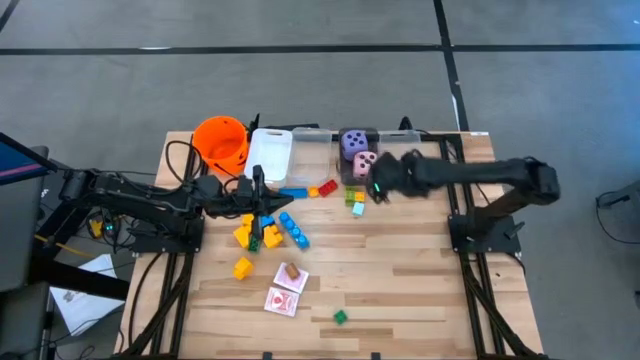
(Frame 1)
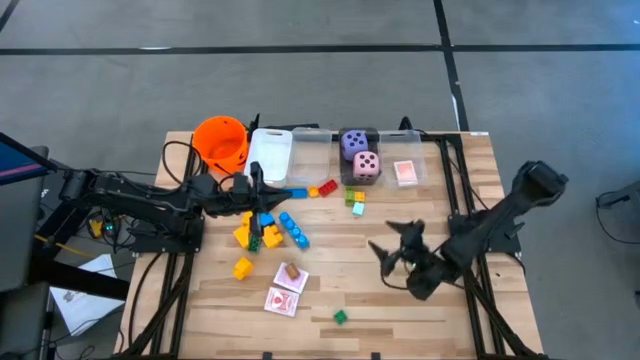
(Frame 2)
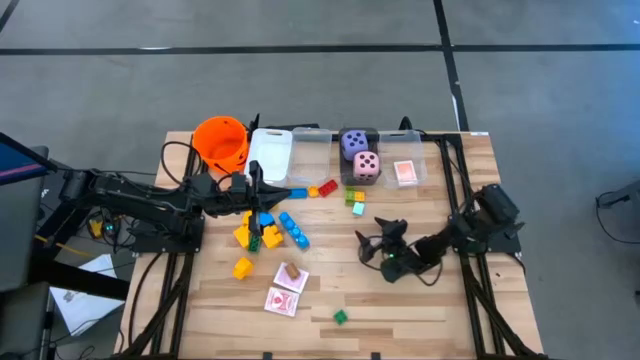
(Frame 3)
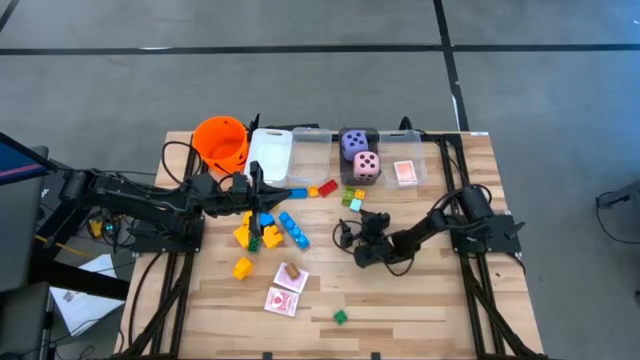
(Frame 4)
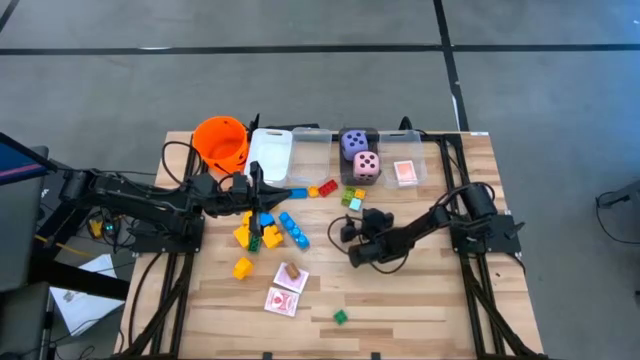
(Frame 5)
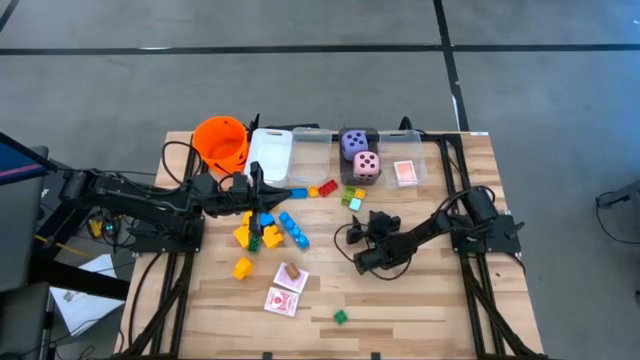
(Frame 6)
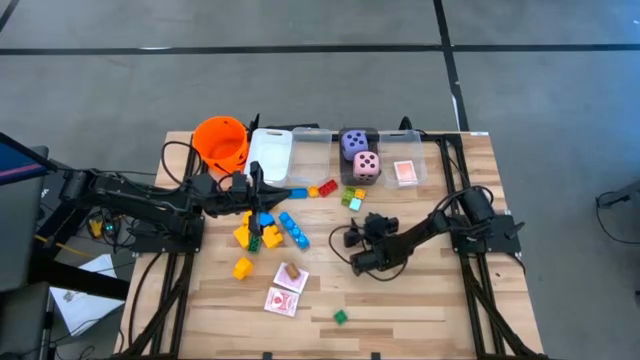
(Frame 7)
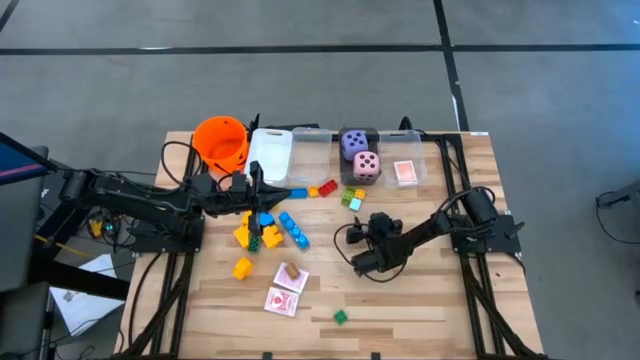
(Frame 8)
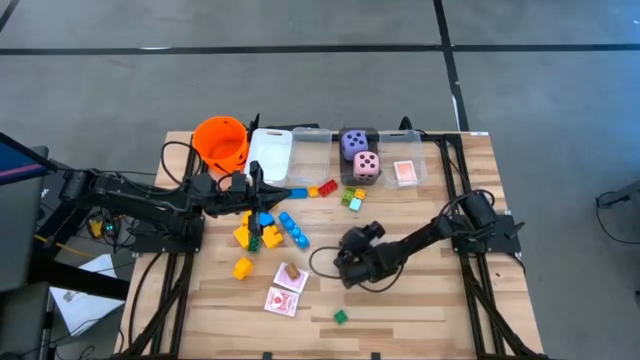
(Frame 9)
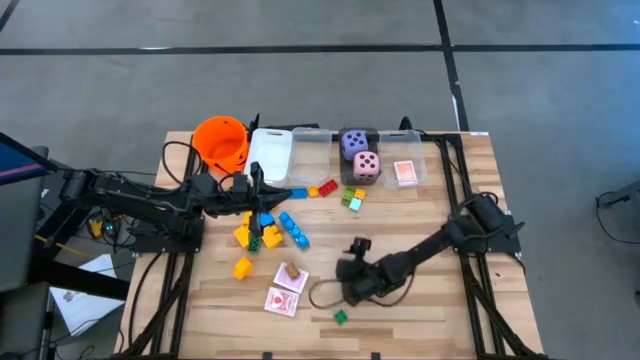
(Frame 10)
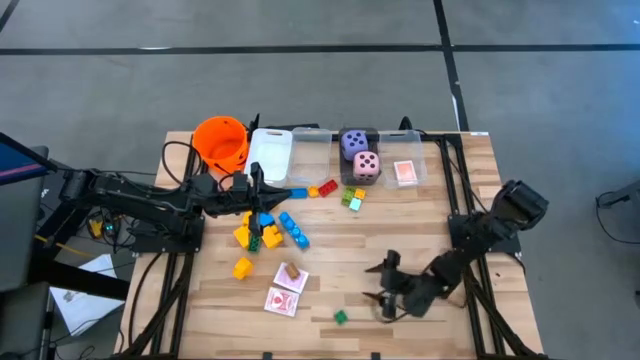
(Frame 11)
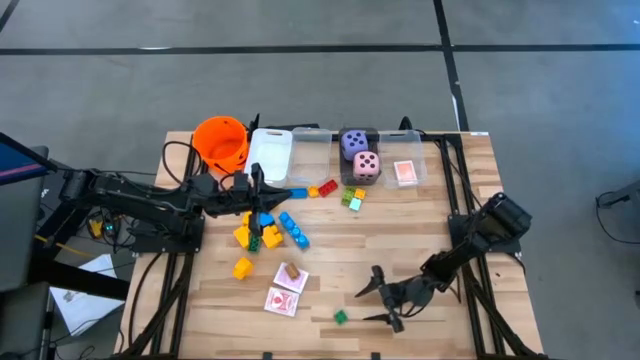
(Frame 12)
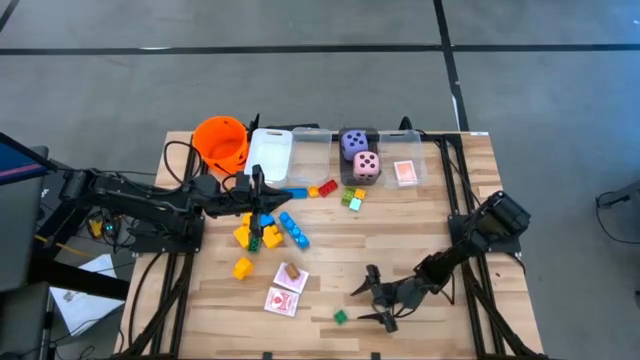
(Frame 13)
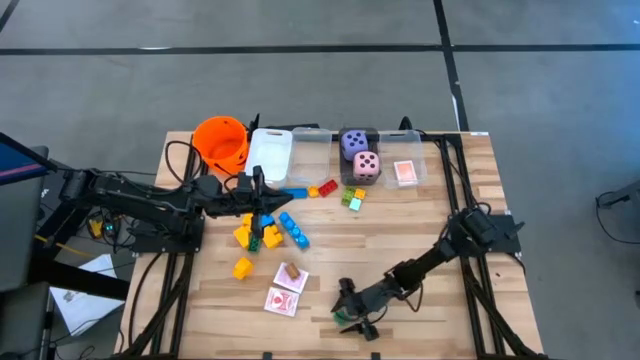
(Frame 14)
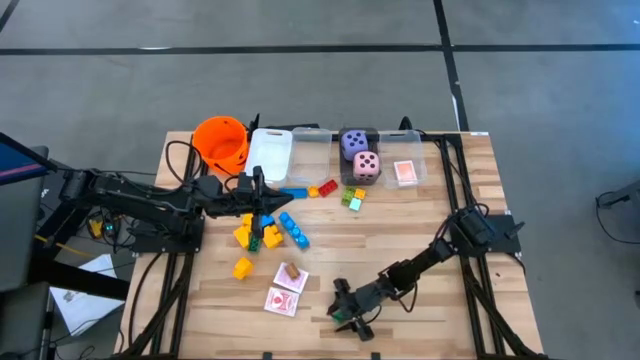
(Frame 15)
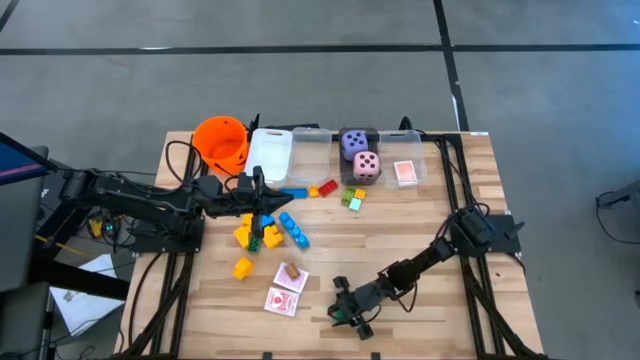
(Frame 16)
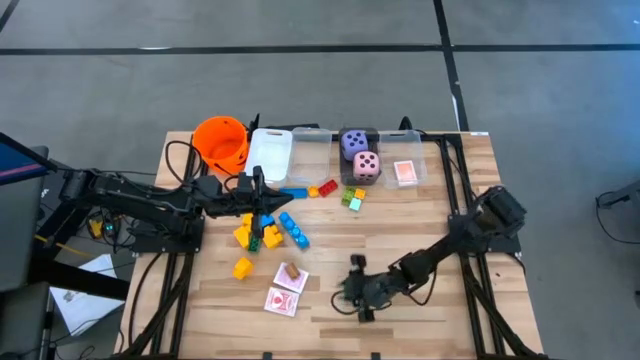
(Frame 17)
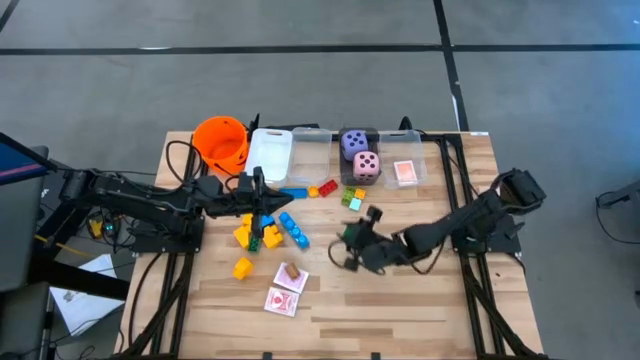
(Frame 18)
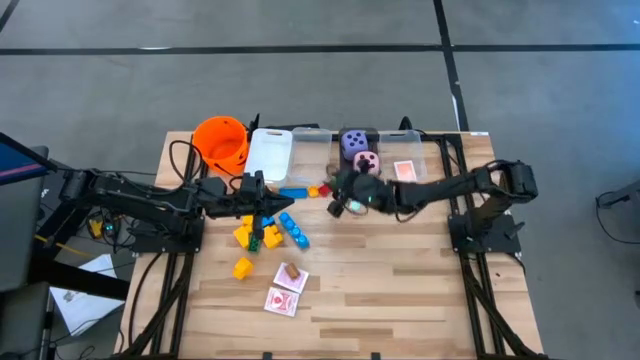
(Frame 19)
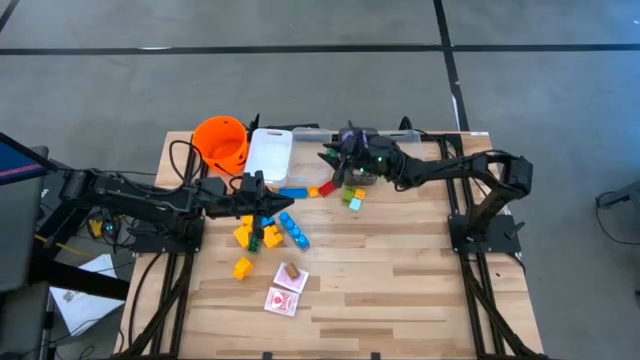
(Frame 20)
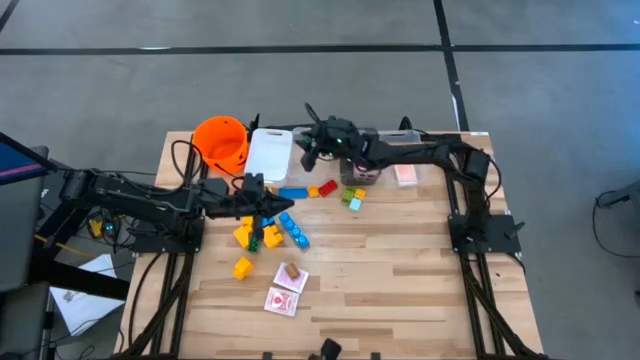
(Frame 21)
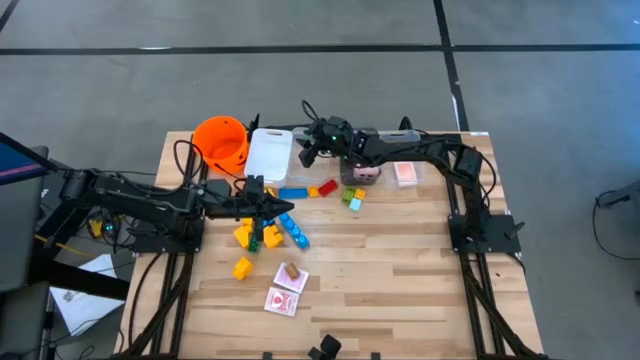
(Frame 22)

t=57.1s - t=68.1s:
Task: Pick & Place Toys
Put the small green game piece into the left transparent bin

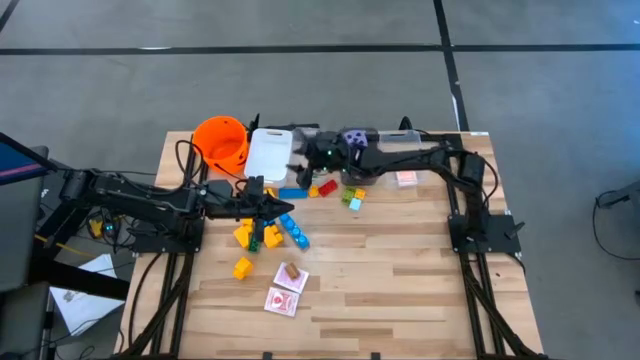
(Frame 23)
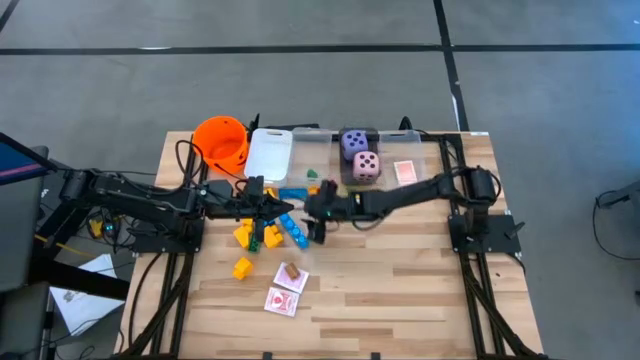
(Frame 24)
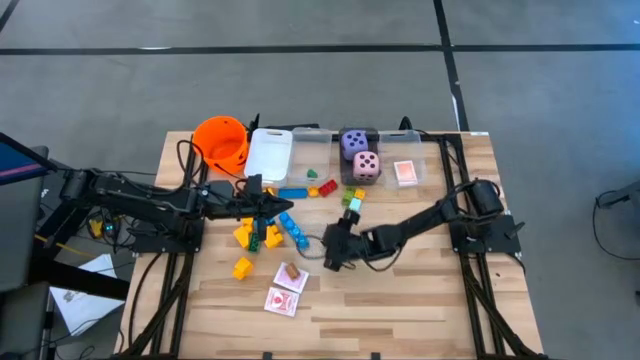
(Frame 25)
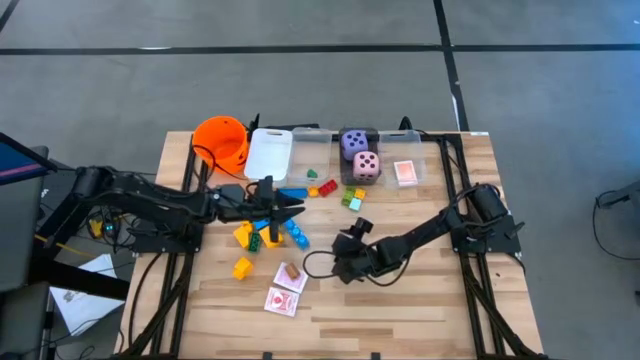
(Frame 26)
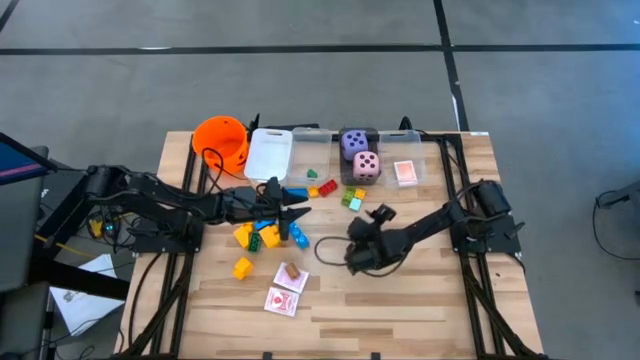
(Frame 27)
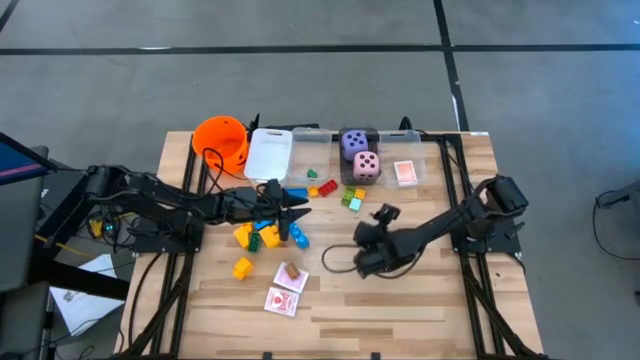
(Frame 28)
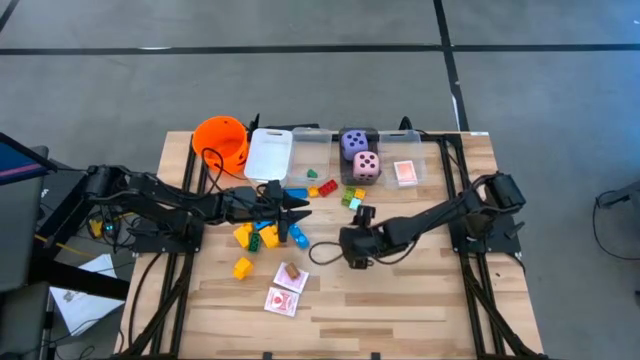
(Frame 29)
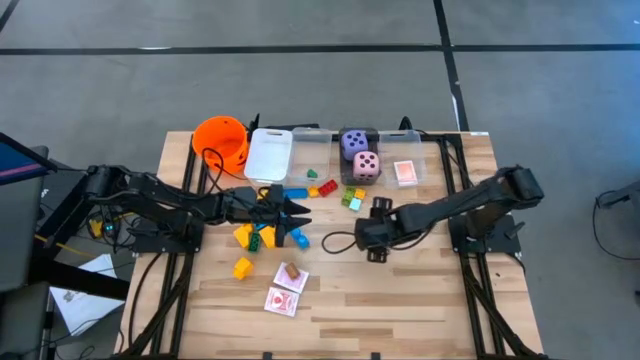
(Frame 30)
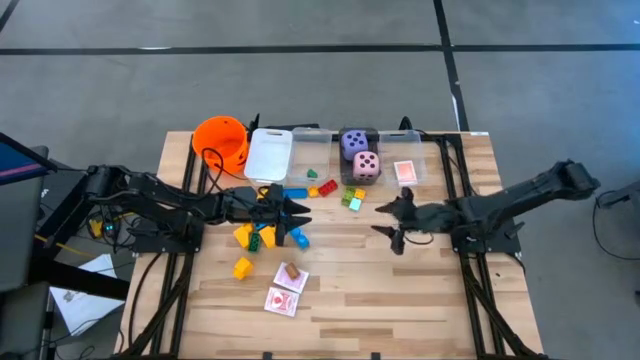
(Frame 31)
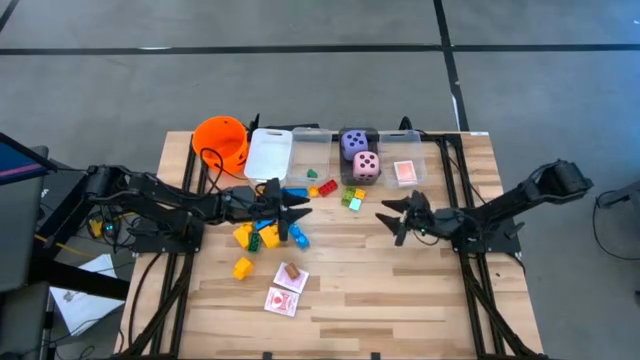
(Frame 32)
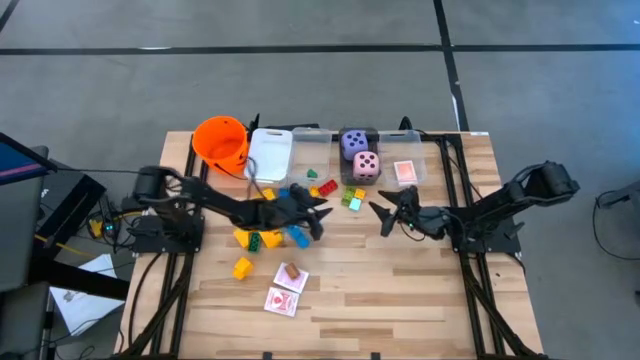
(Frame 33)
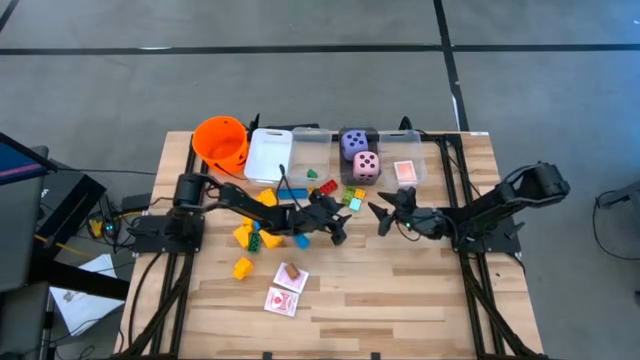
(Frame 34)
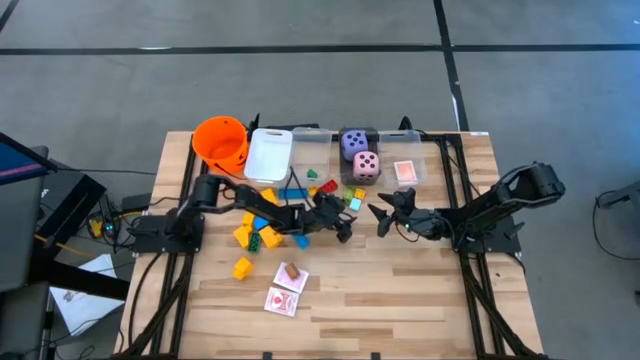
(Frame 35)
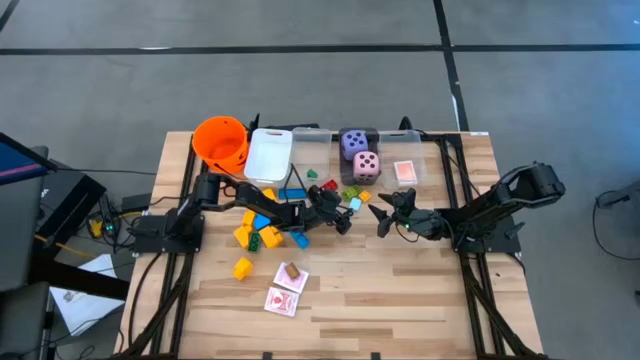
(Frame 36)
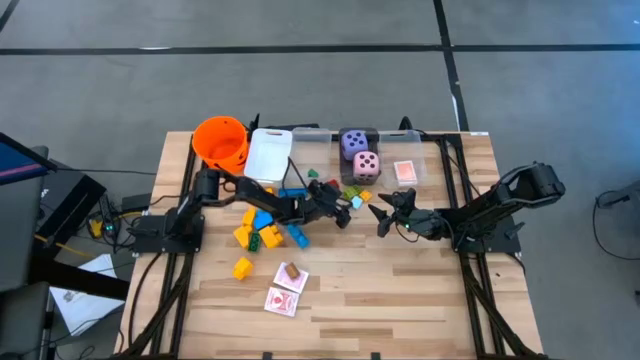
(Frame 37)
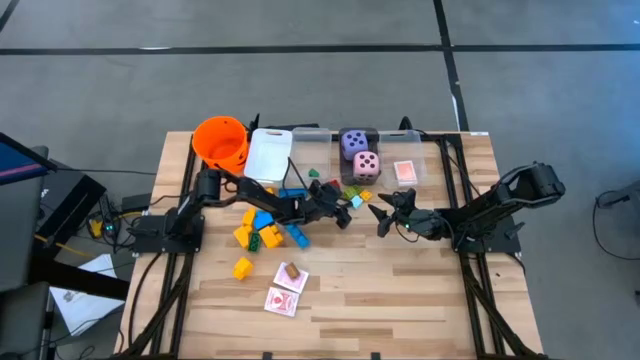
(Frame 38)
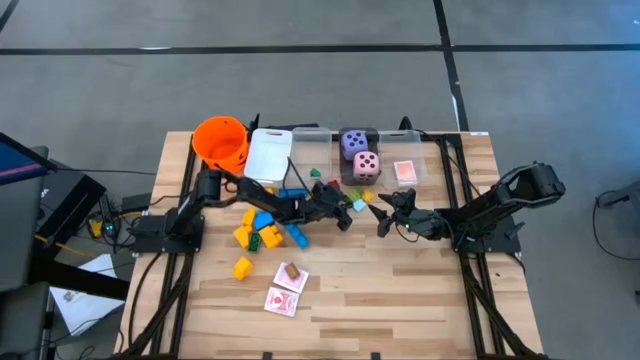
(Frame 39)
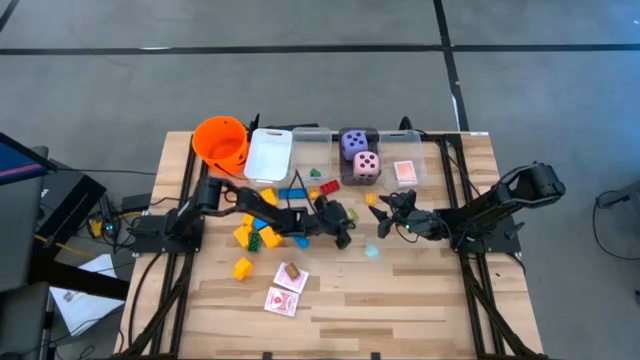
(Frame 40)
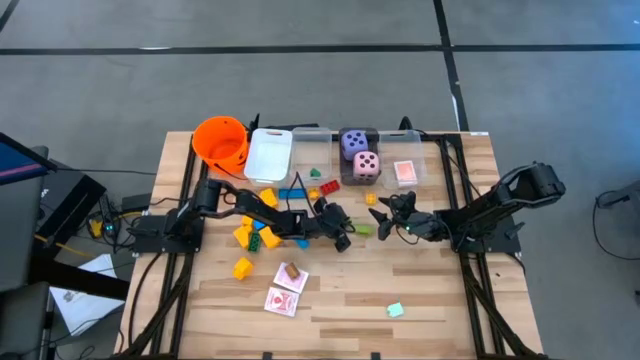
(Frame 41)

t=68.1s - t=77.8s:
Put the small light green game piece into the left transparent bin

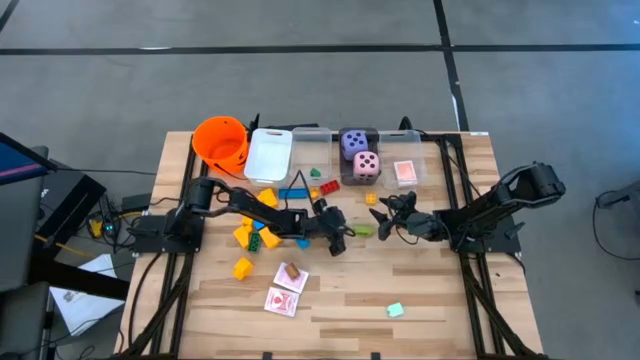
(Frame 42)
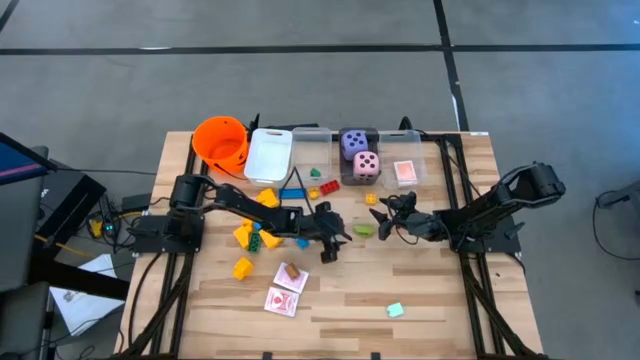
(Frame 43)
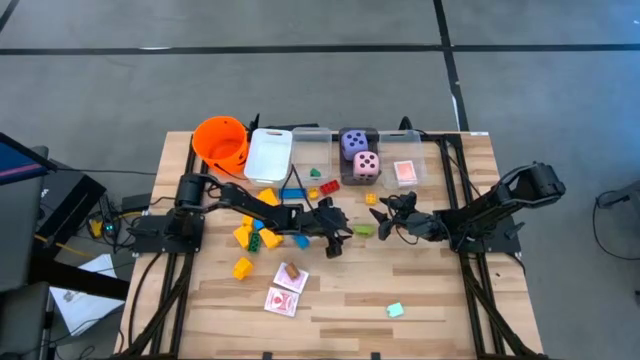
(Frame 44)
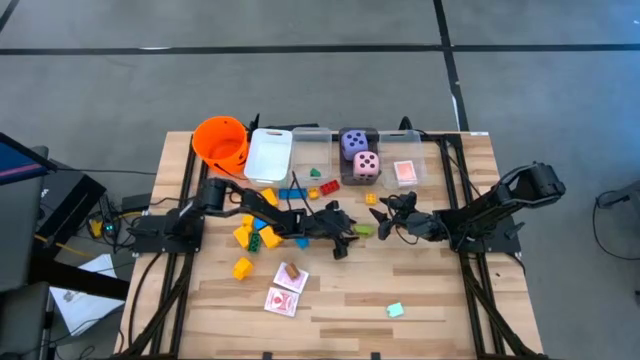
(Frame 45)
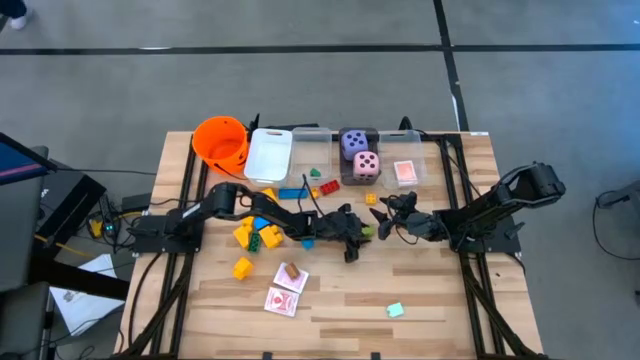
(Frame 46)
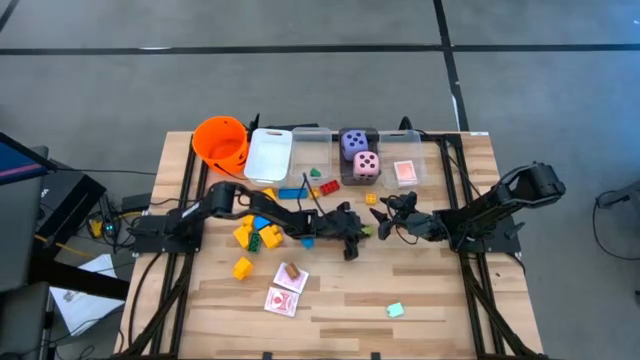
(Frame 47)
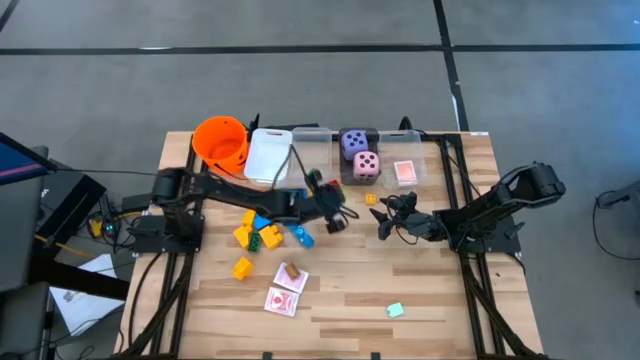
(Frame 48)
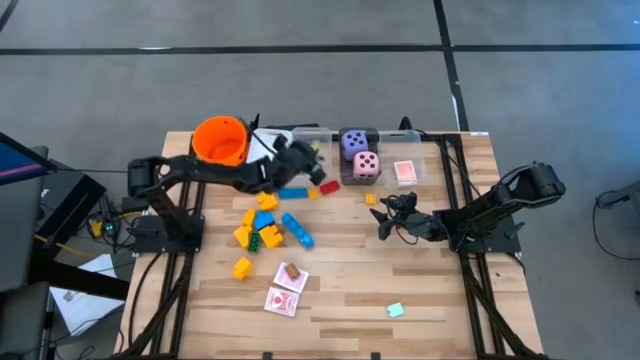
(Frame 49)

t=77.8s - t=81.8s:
Put the small light green game piece into the left transparent bin
